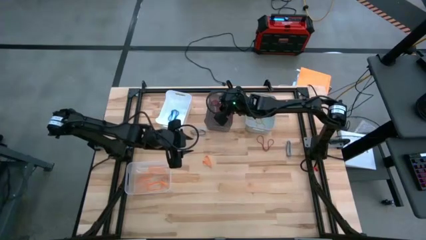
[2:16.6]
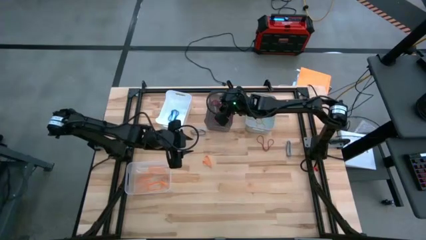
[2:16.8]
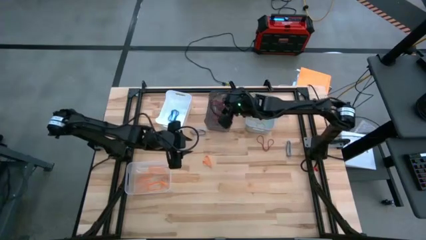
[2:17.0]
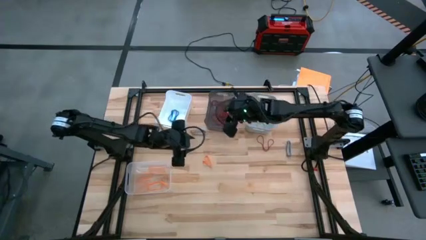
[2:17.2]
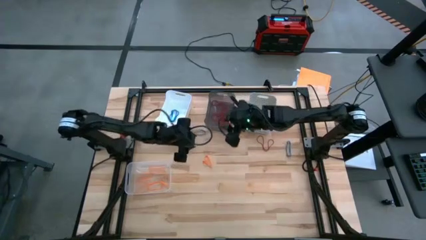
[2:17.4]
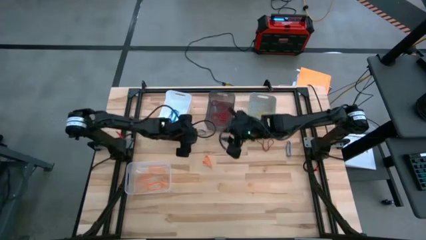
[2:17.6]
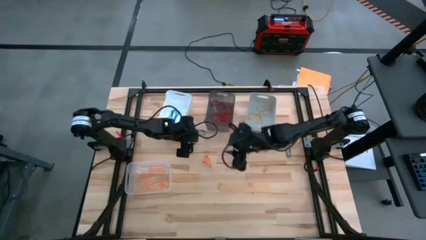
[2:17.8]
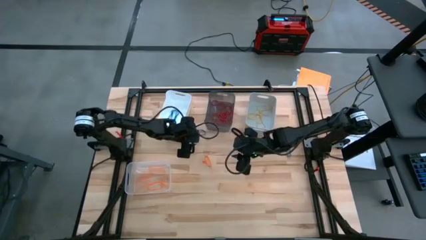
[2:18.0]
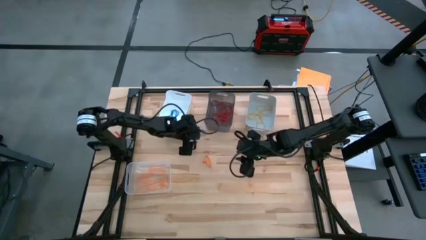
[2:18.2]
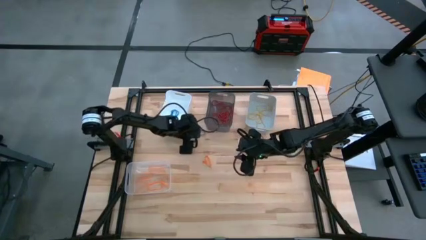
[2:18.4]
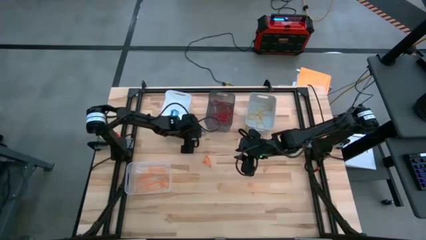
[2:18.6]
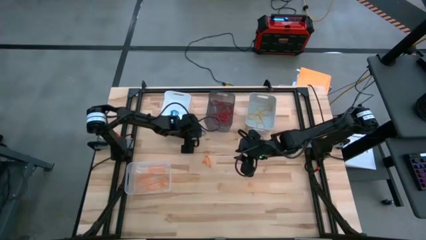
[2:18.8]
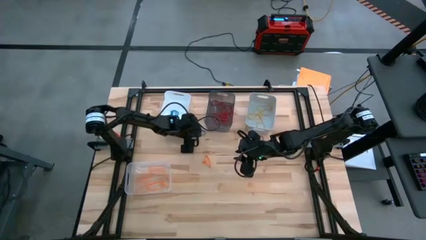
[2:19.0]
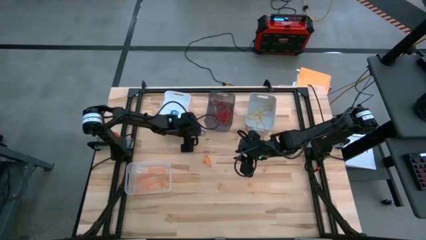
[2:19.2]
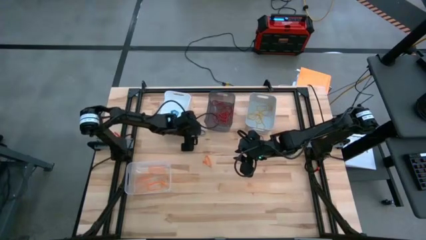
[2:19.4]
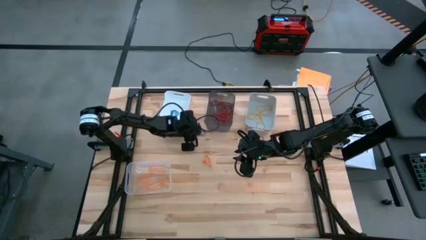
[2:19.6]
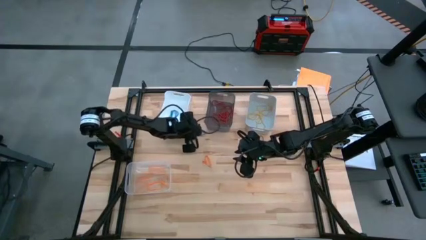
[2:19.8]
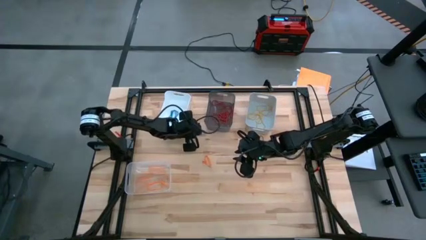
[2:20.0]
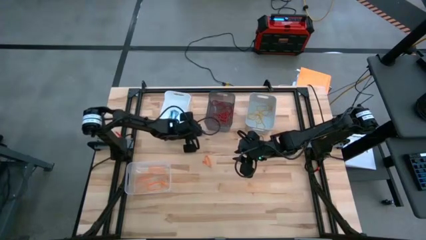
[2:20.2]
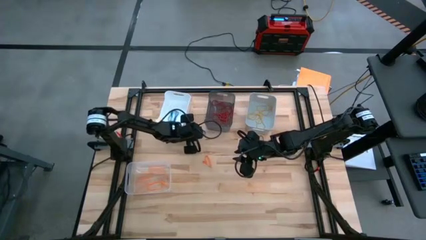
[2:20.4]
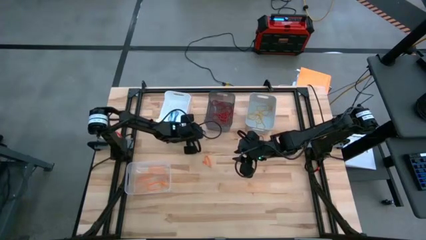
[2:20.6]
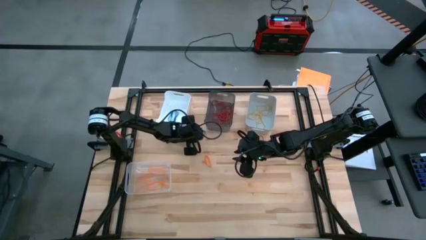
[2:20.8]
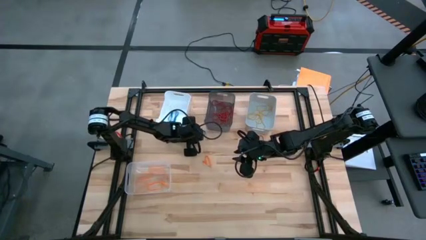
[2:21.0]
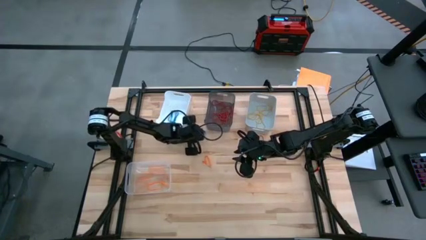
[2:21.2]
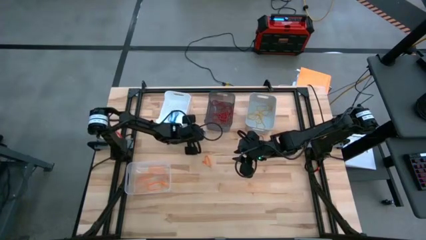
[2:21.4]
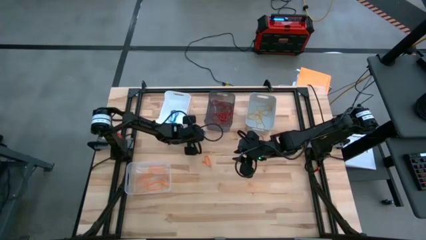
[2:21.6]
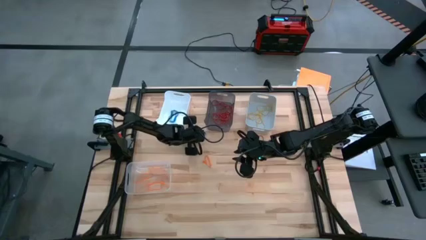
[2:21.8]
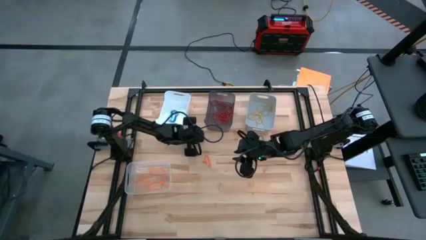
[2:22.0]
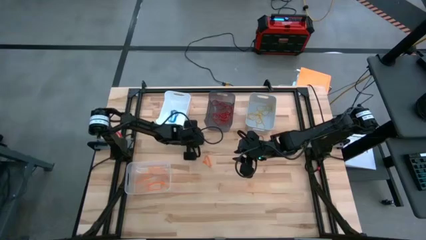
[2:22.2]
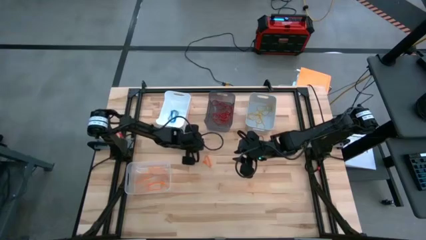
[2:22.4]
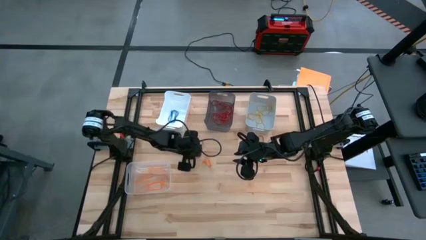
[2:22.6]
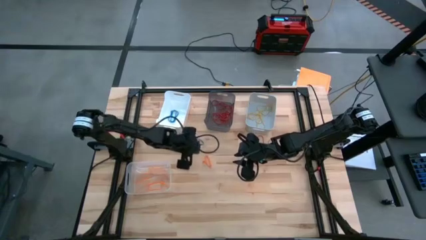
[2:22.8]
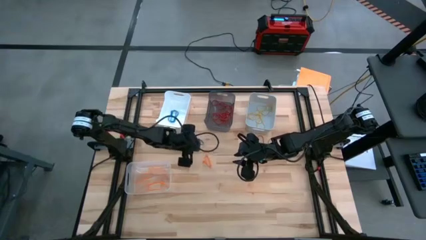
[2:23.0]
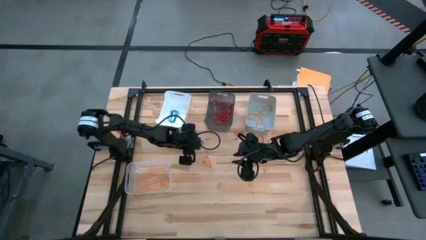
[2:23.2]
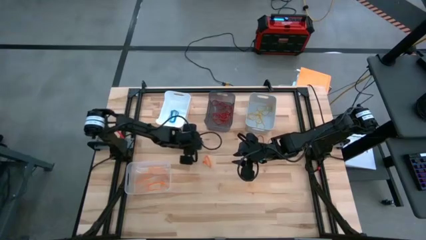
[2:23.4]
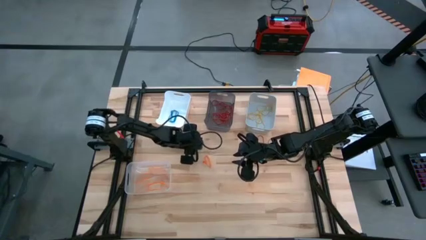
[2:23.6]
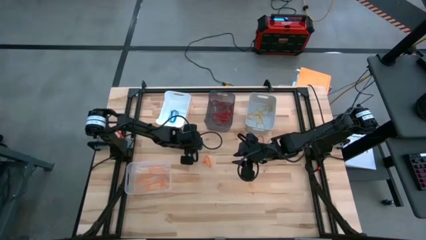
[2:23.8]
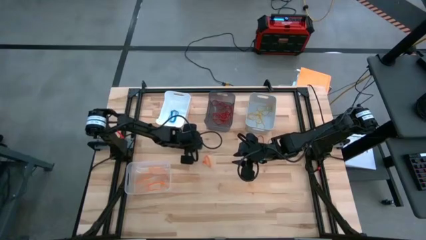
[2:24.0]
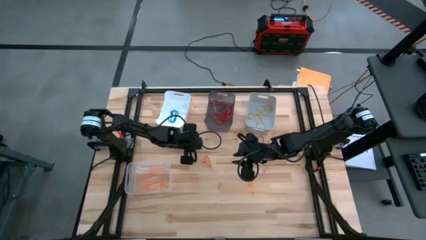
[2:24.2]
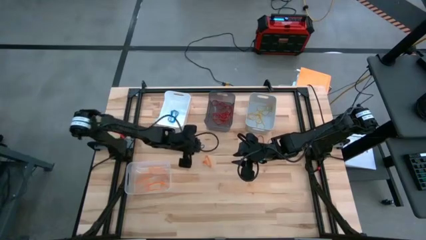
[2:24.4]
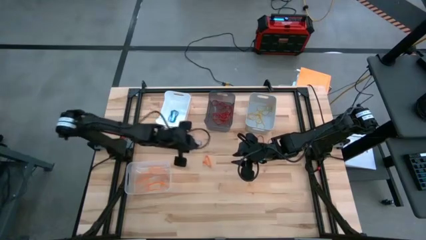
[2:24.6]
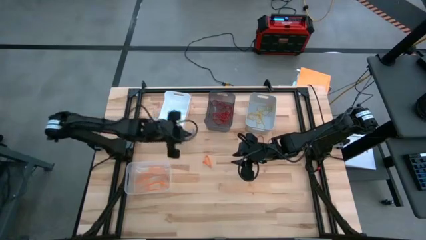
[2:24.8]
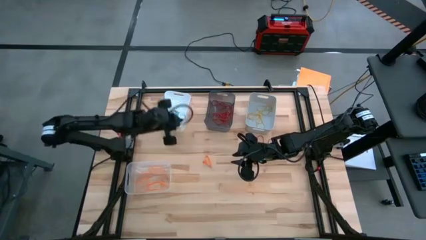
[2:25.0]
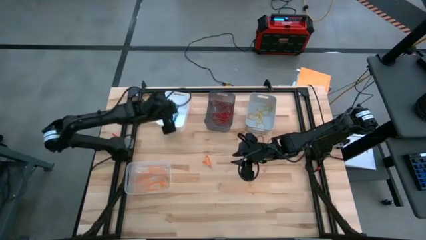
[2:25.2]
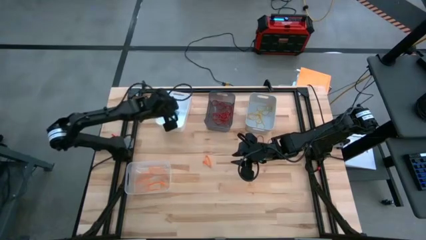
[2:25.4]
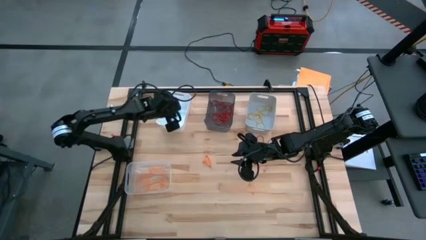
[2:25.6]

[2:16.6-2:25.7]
Task: Sort rubber bands into baskets
Put the blue rubber band into the white bin

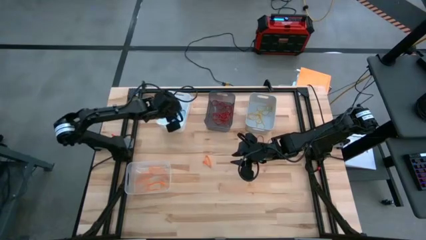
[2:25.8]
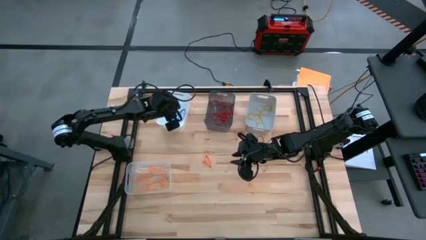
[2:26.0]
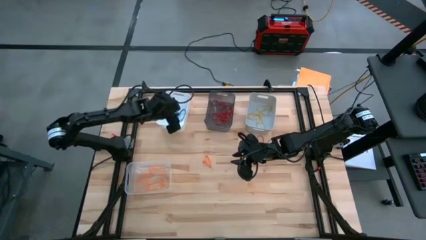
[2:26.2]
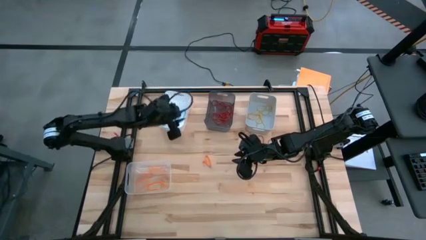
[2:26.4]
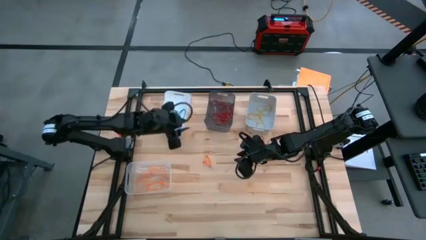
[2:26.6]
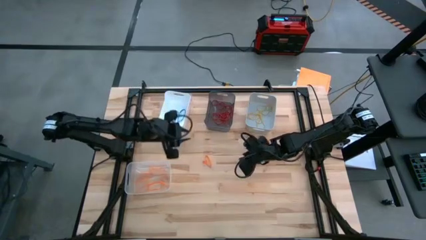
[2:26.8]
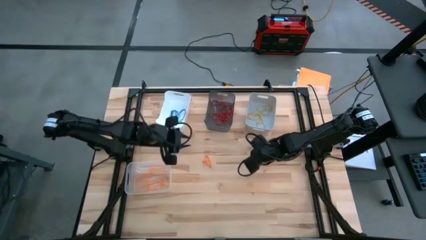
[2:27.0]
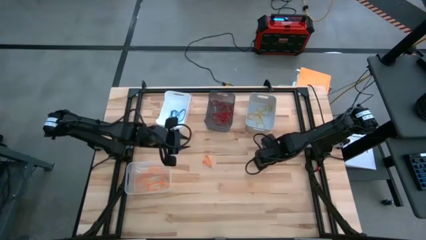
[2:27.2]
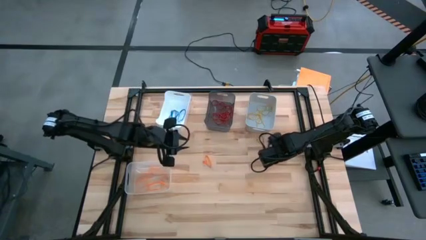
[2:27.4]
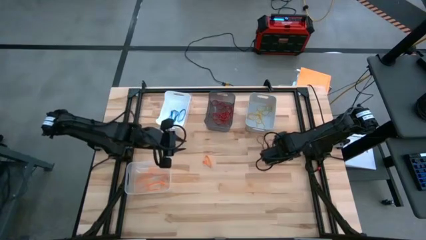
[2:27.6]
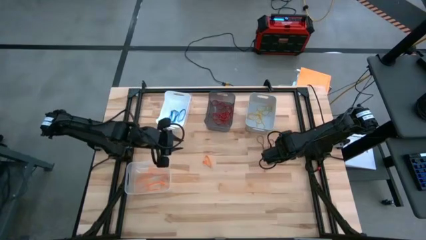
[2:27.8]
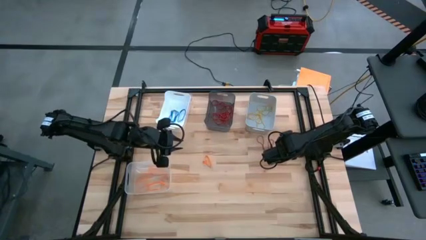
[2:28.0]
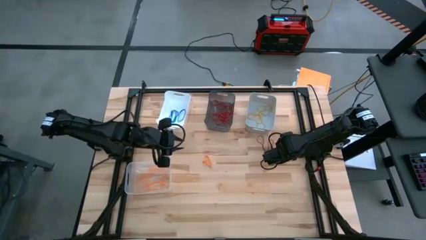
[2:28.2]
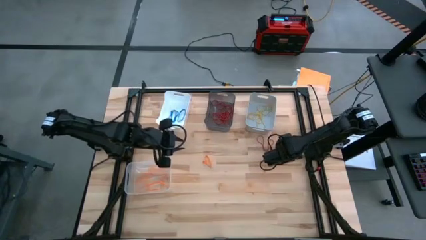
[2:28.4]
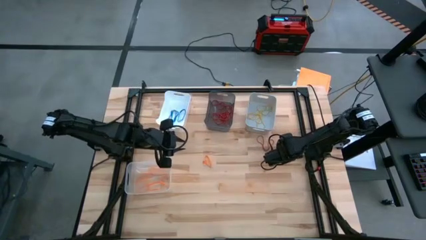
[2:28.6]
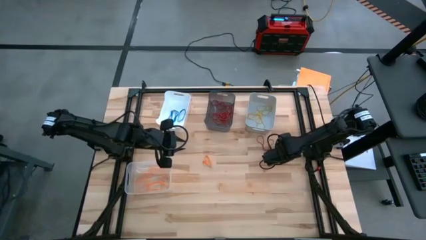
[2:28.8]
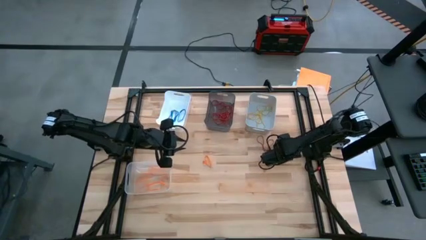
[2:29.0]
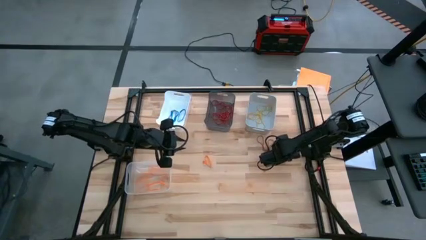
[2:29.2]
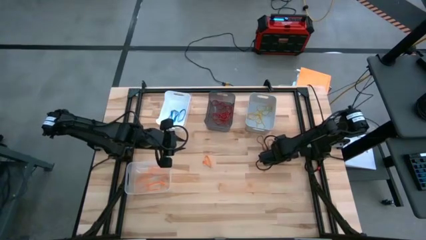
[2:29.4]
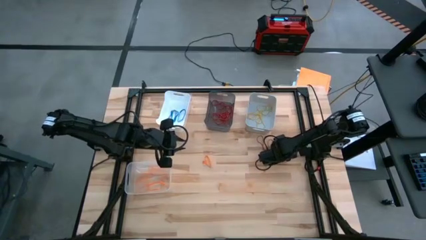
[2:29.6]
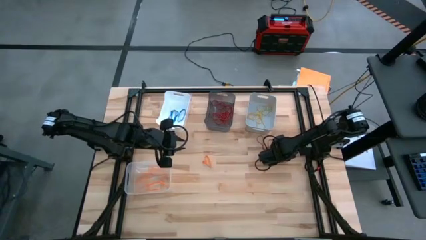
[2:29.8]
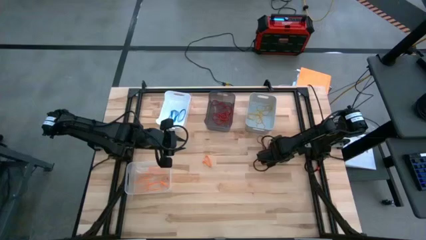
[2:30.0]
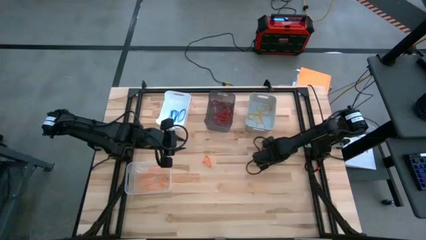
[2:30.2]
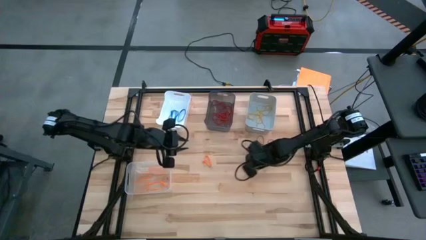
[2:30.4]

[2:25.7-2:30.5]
Put the blue rubber band into the white bin

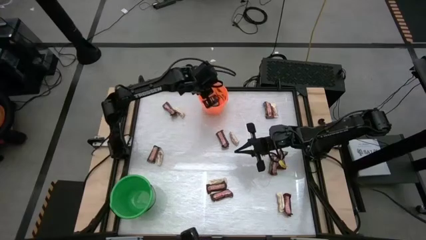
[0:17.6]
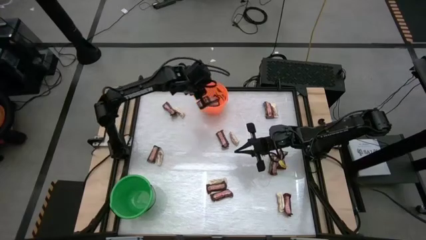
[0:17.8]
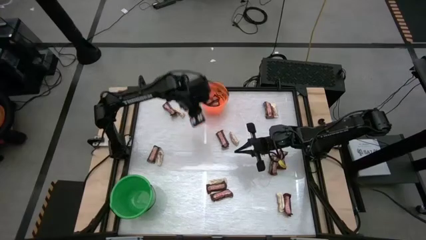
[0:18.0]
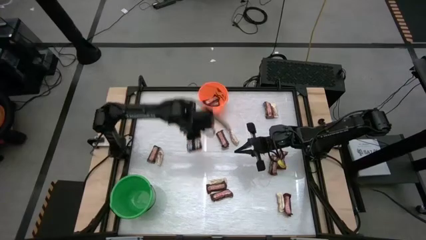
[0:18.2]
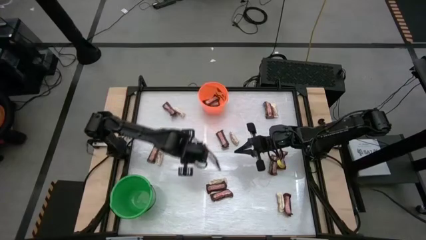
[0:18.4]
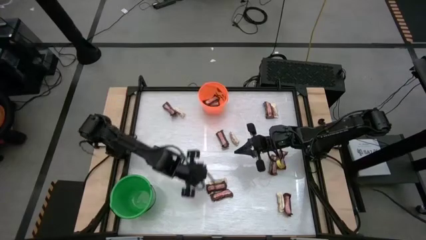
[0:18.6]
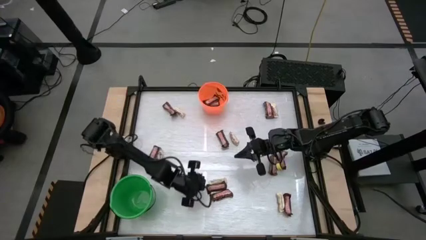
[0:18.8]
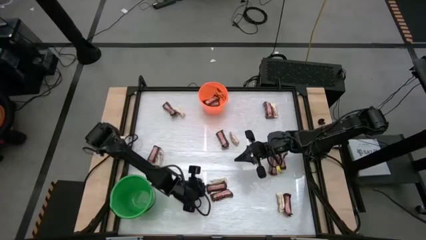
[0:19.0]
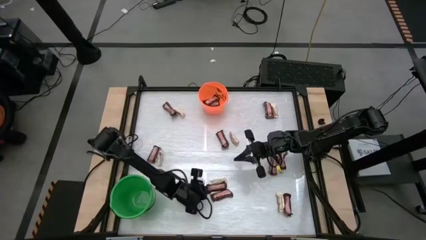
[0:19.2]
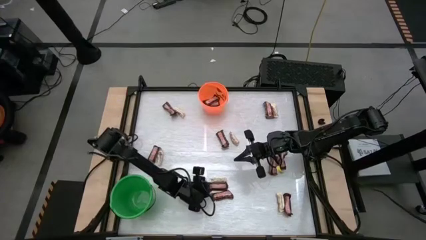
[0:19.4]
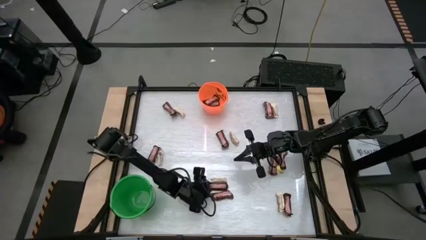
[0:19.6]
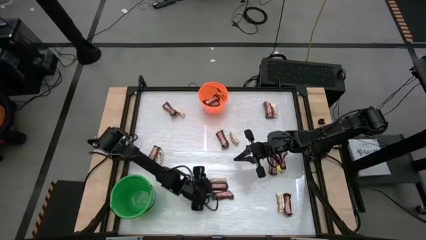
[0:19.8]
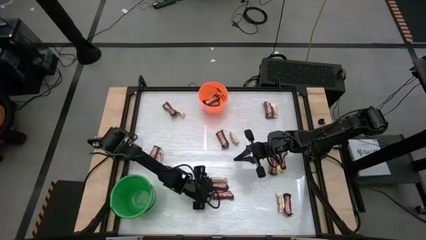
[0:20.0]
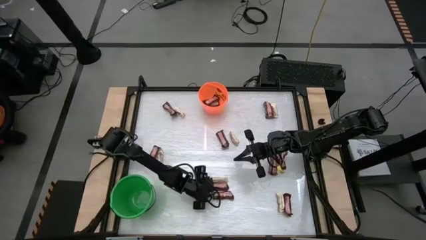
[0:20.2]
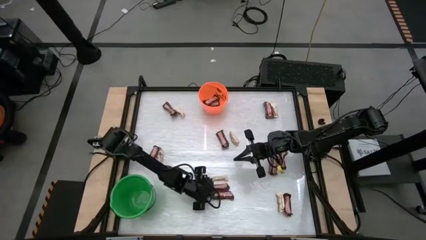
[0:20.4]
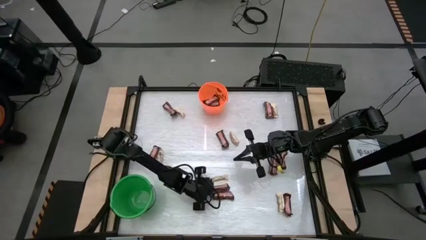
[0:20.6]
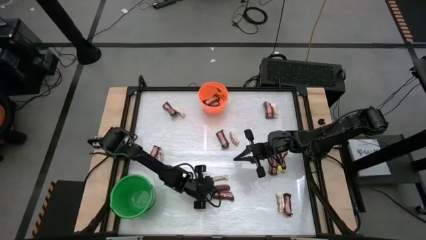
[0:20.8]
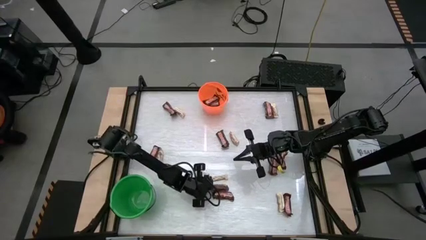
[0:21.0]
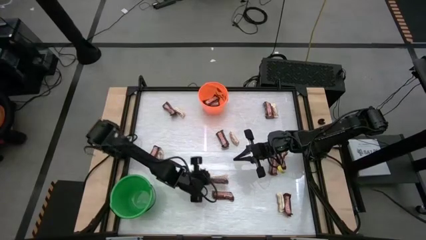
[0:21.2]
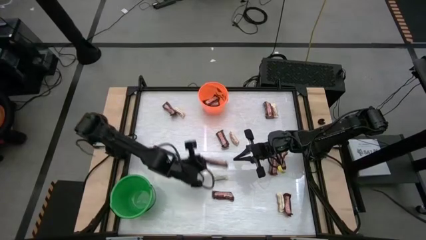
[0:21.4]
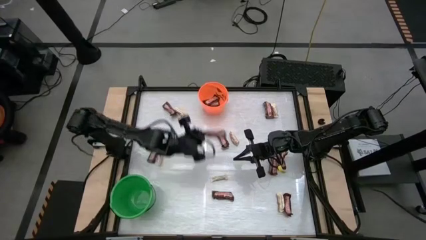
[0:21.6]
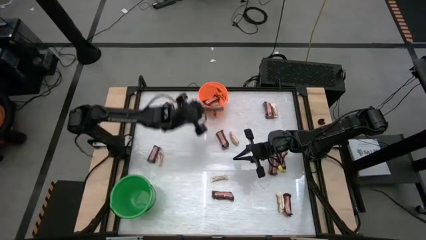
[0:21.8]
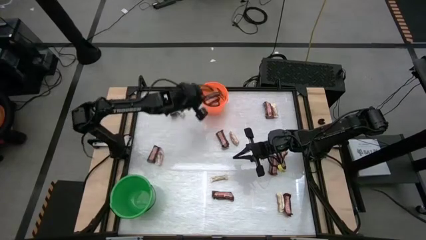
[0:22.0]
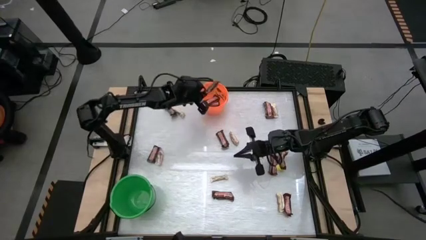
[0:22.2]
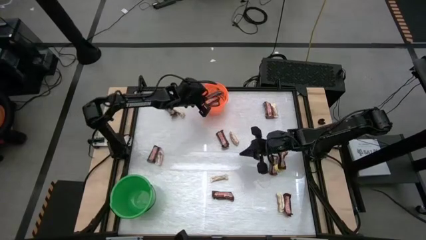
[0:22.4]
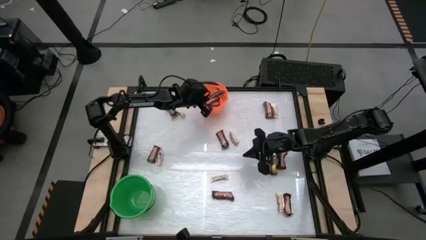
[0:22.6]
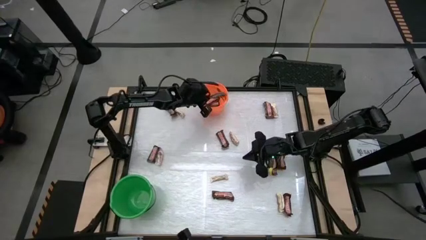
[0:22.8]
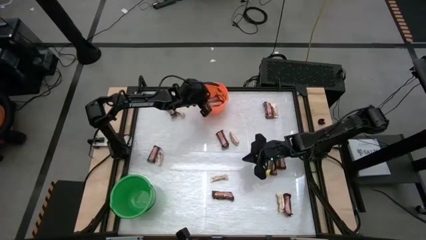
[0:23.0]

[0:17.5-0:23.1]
Task: Sort candy by brand, put in halloween buckets
Put the brown chocolate bar into the orange bucket
